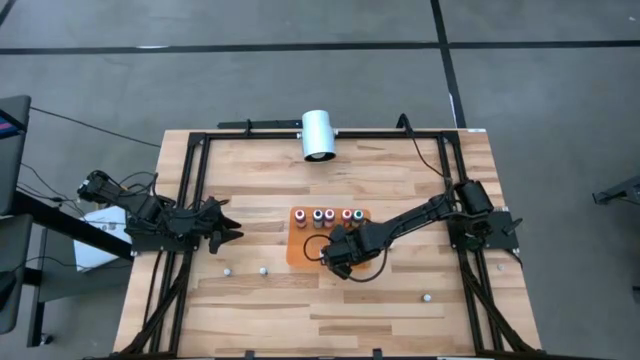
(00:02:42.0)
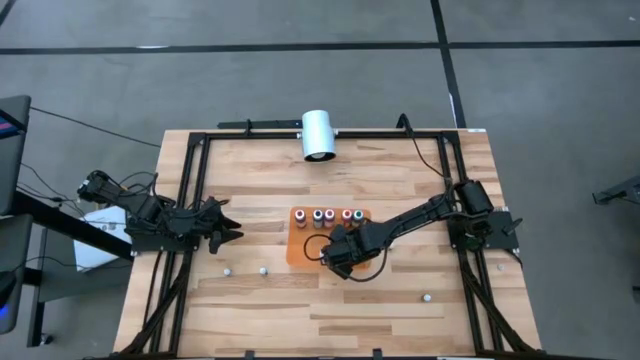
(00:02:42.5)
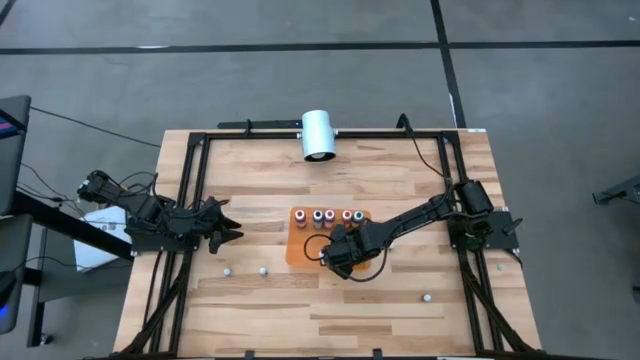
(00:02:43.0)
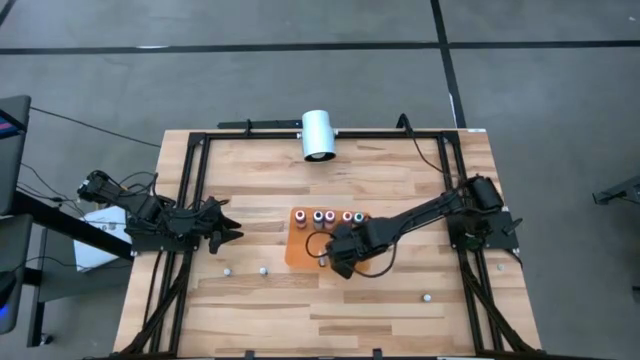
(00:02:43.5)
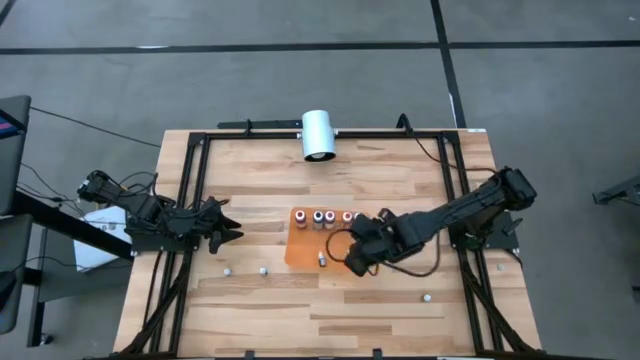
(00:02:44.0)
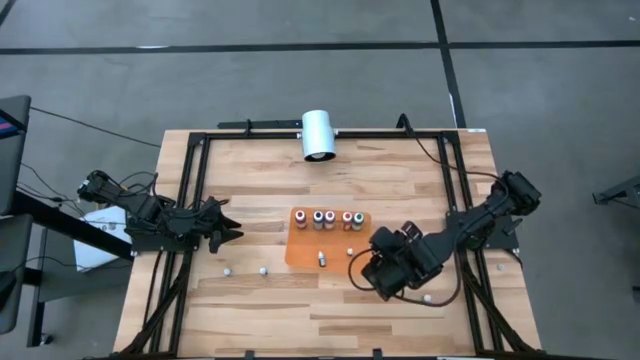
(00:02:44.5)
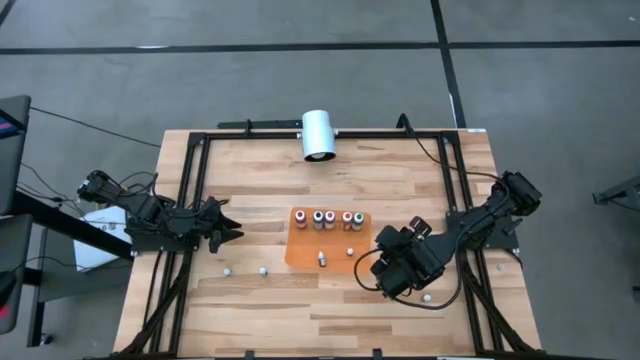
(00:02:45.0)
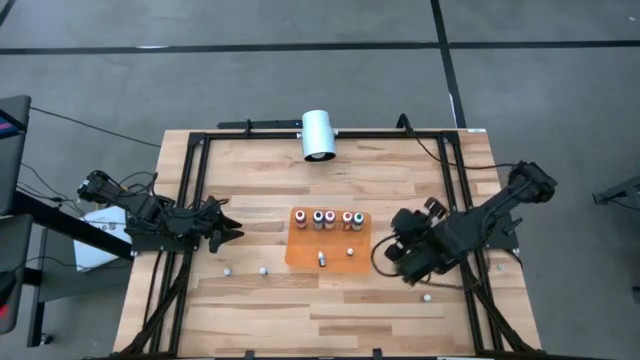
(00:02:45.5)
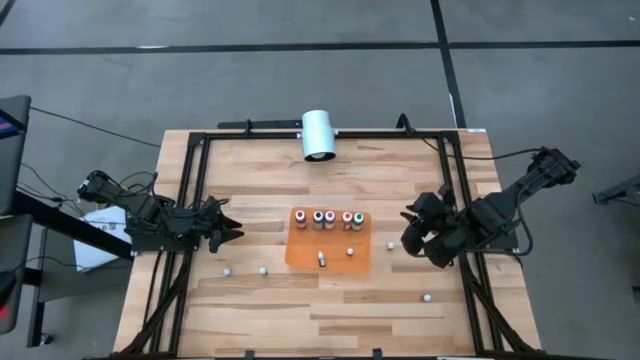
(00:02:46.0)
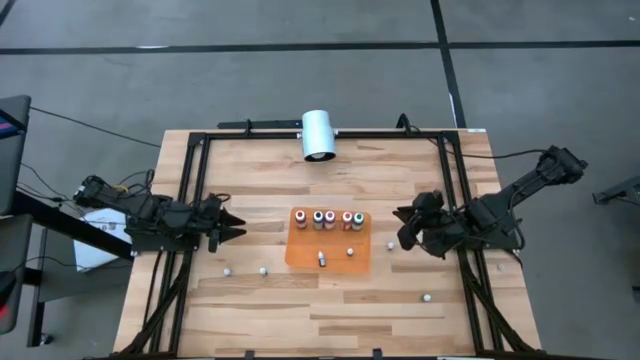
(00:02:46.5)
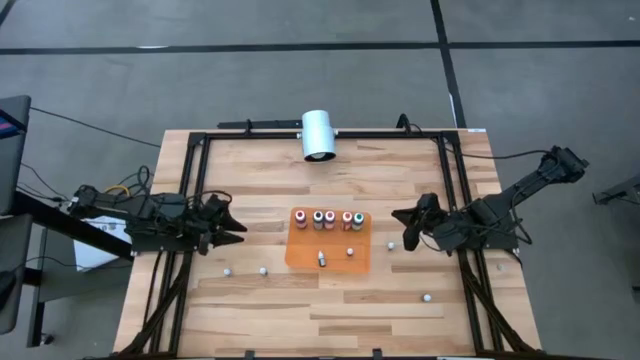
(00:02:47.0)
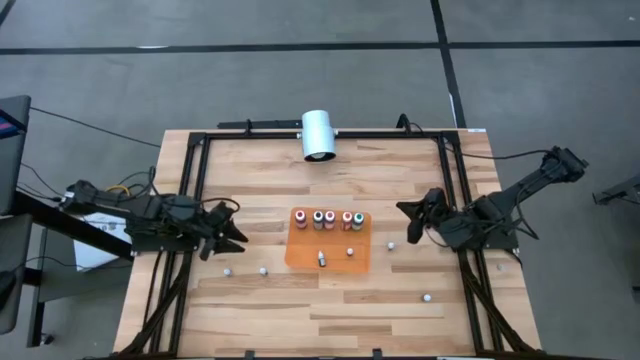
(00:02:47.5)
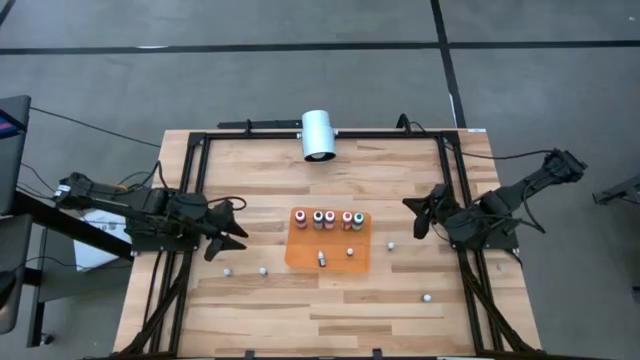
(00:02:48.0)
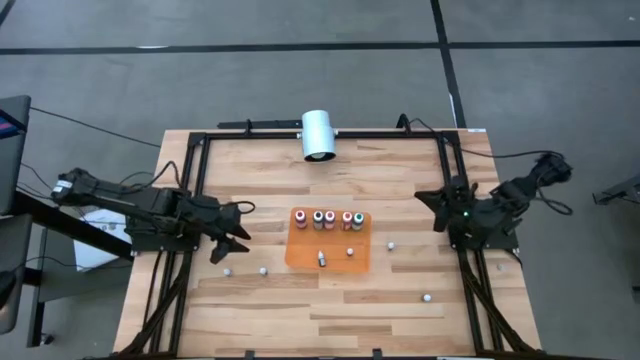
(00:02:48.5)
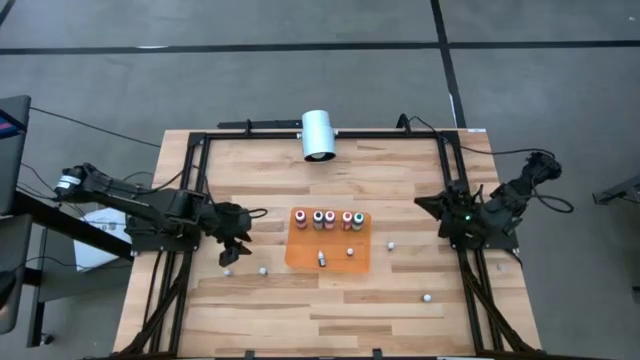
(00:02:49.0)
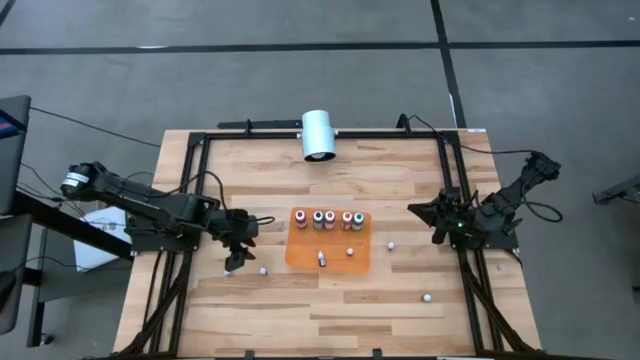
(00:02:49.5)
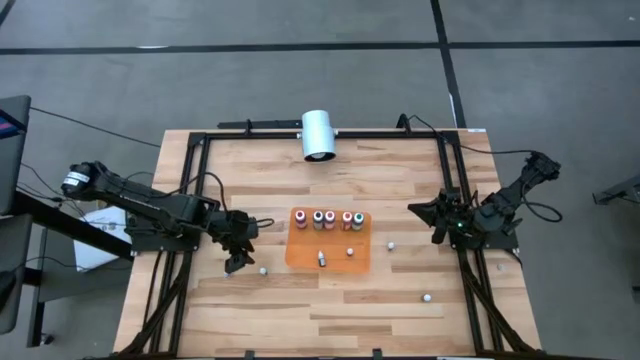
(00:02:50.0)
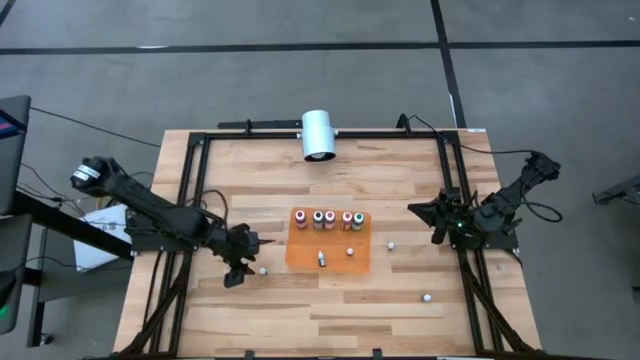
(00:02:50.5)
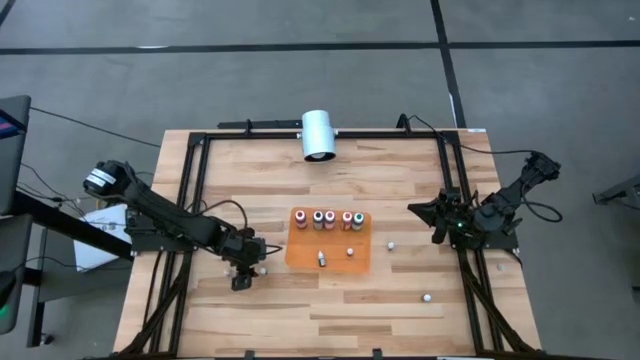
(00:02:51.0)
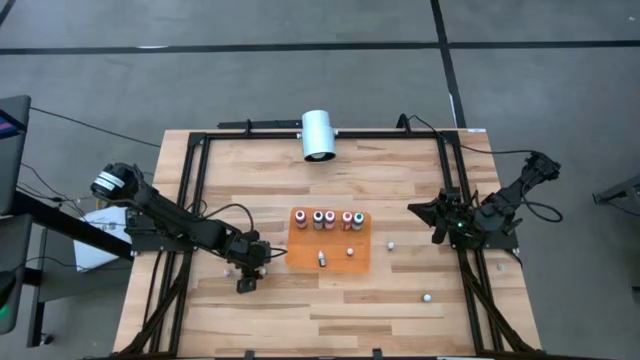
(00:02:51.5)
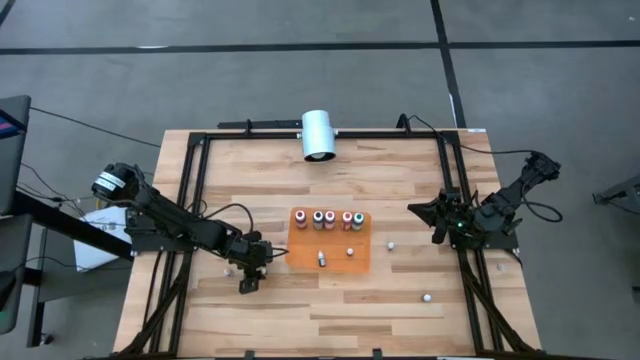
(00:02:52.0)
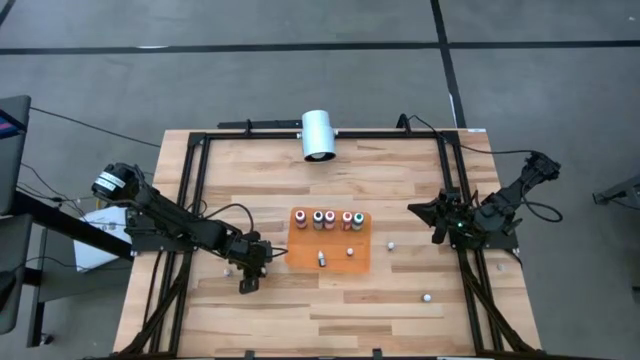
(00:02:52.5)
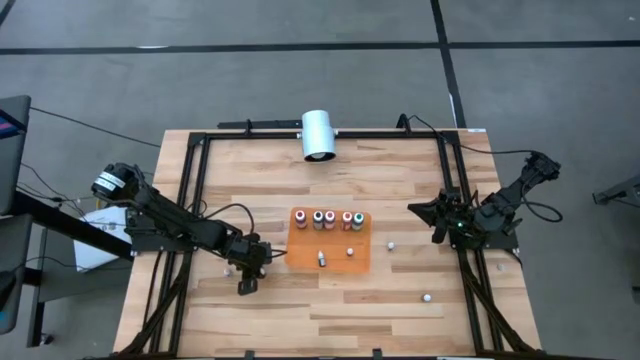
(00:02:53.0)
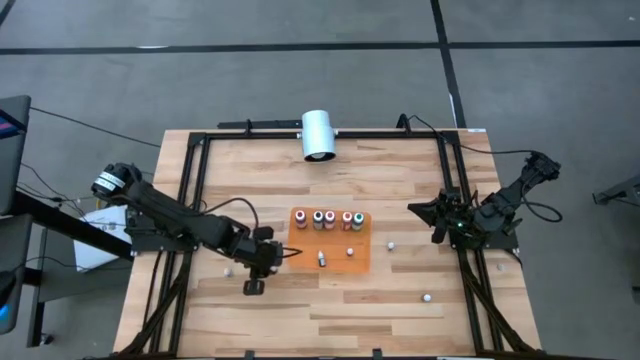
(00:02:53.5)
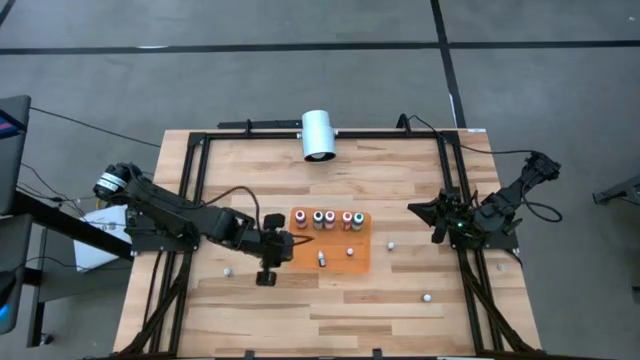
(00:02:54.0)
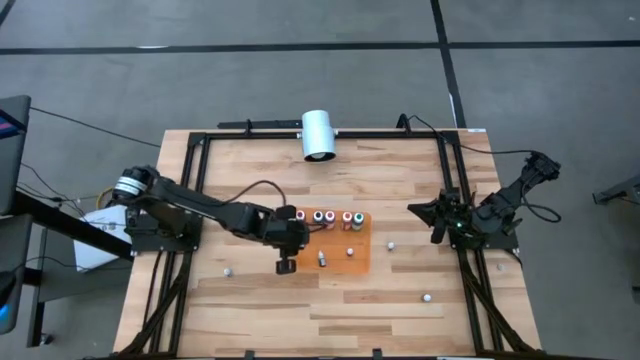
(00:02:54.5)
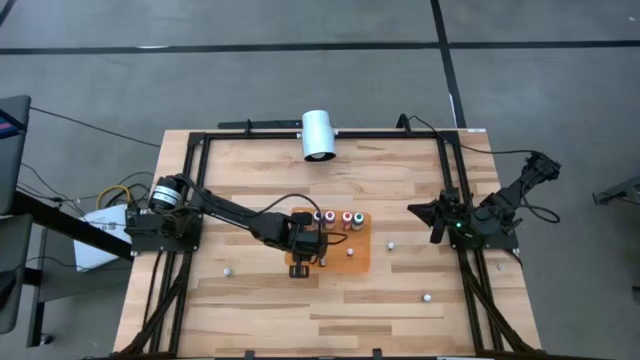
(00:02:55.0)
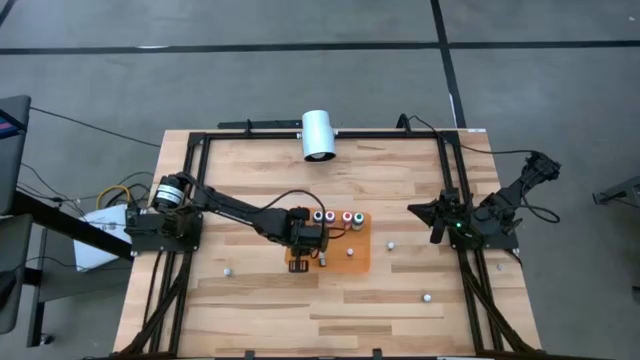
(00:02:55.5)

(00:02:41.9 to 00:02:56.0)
Task: Pick & Place food coloring
Put the small black food coloring into the orange bin

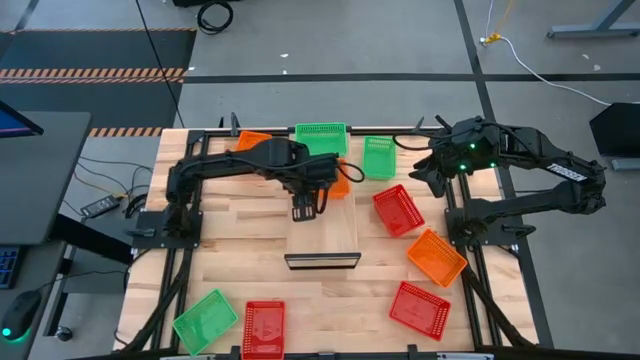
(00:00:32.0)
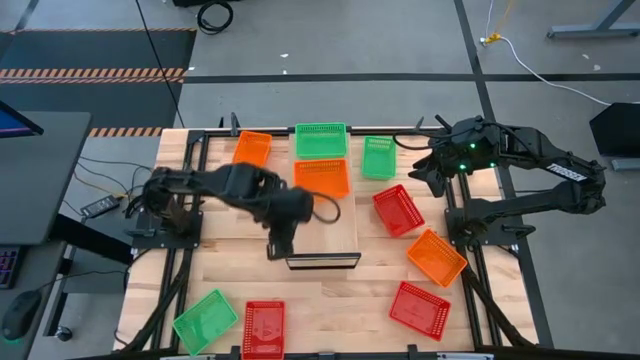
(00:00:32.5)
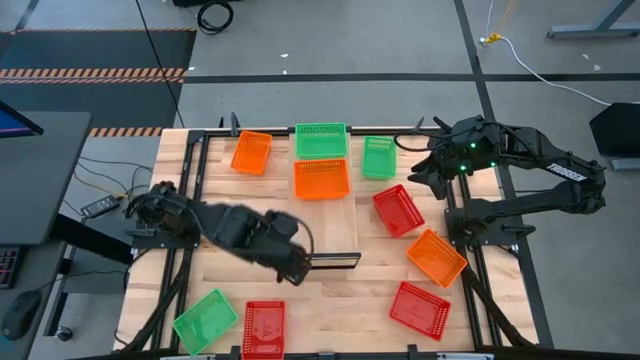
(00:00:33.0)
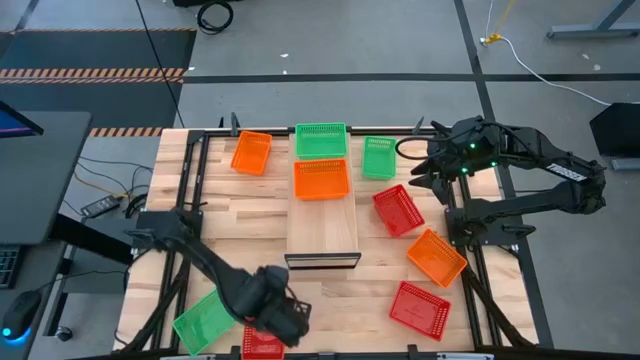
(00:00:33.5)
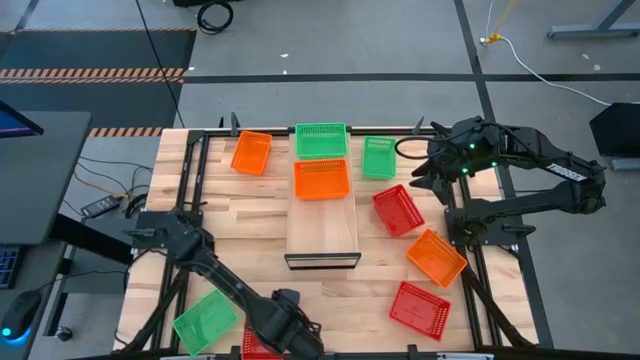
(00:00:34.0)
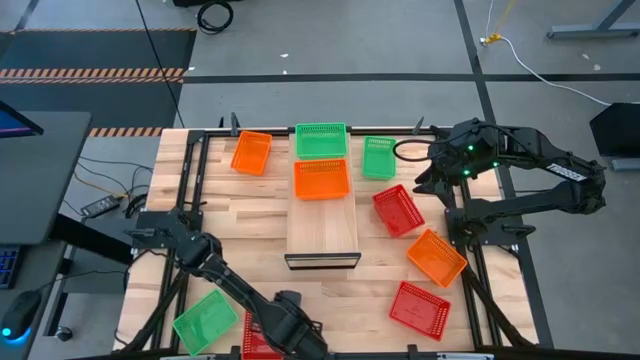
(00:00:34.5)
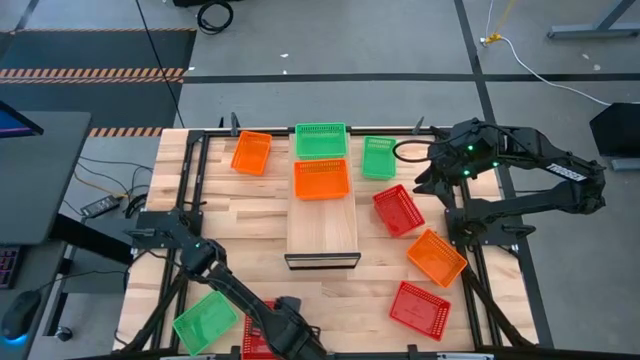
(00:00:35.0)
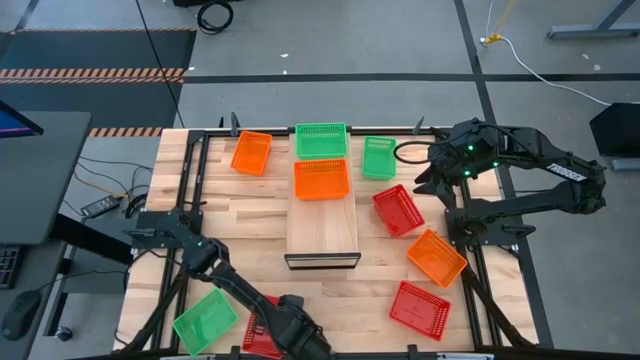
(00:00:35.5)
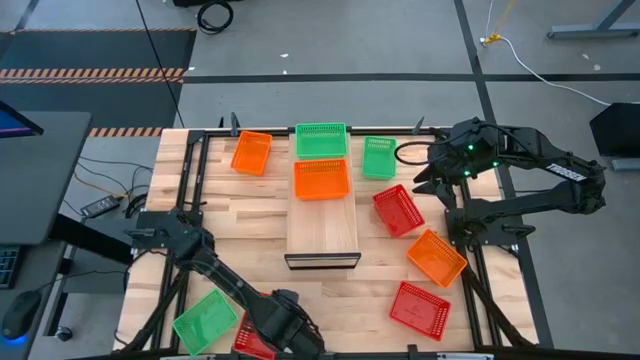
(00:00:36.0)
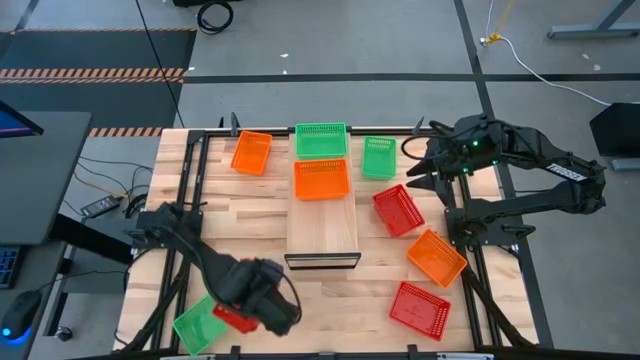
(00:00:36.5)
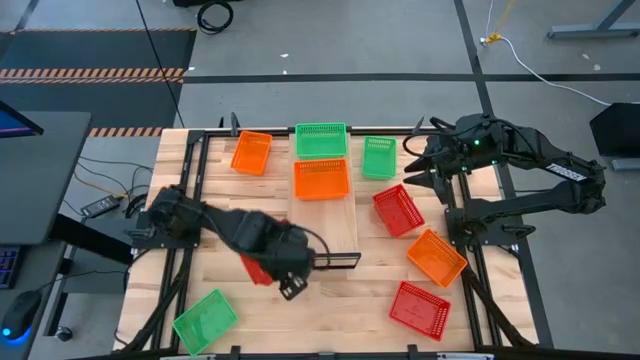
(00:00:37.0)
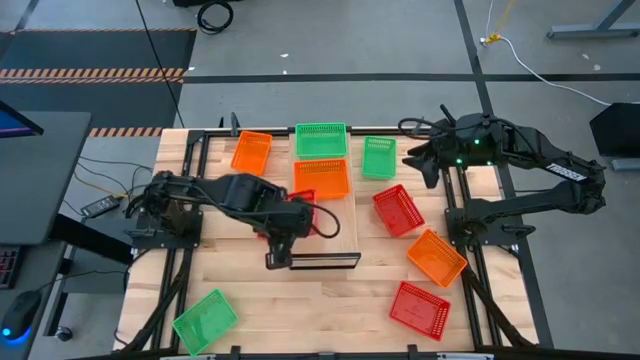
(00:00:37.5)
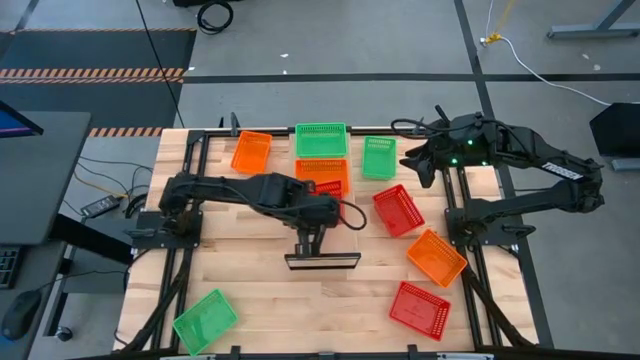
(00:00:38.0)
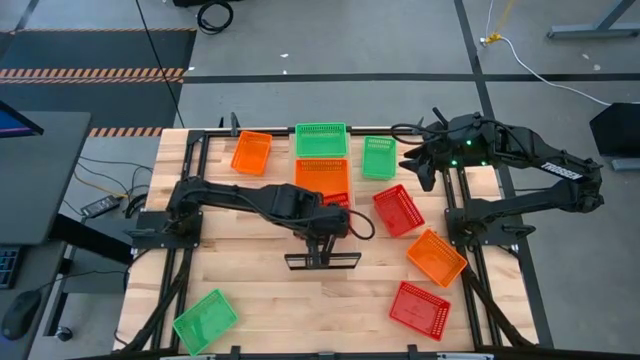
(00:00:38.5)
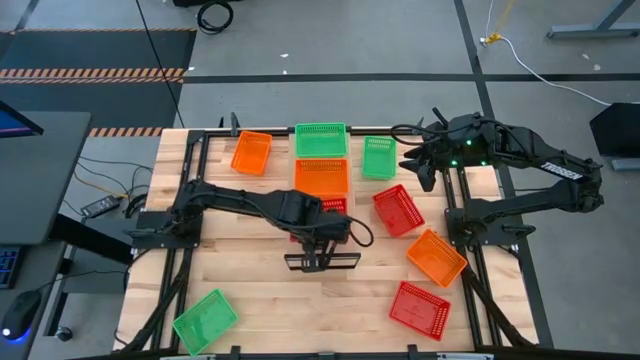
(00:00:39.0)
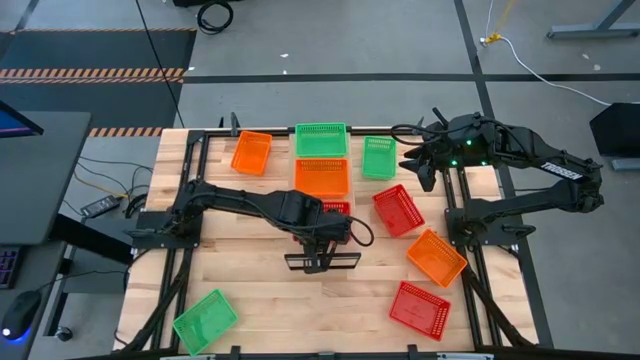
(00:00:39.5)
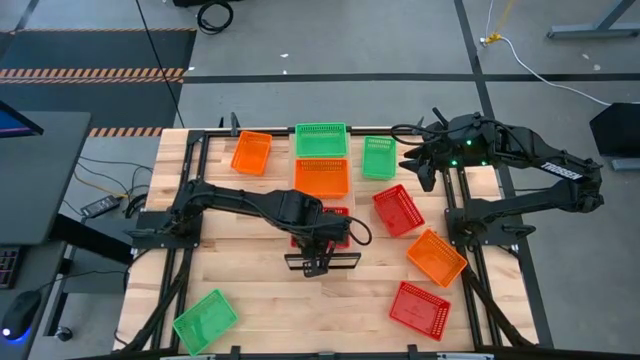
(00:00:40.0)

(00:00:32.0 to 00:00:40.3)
Task: Stack baskets on shelf by color
Put the left red bin on the shelf
